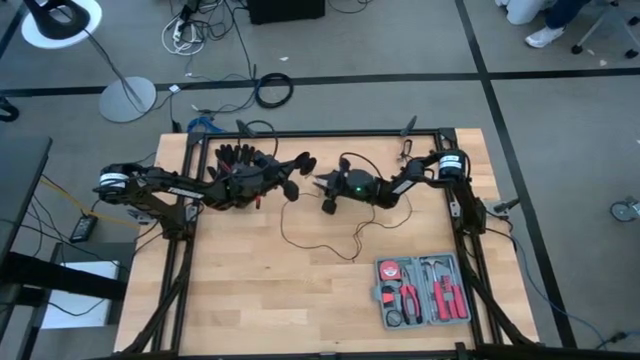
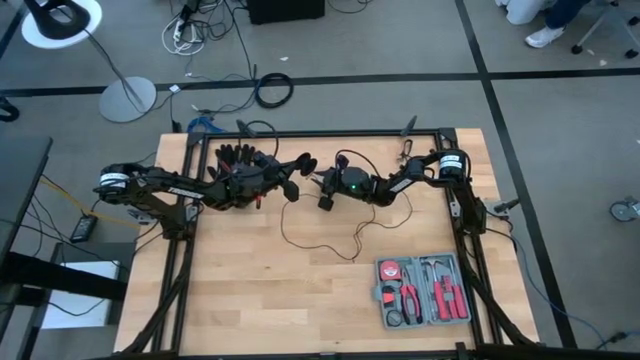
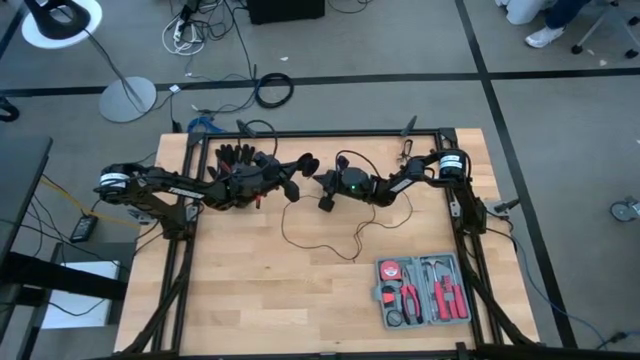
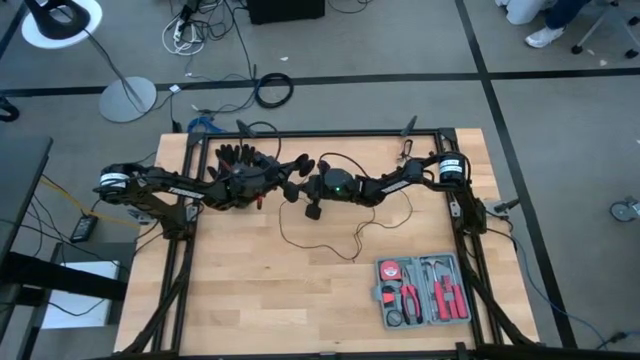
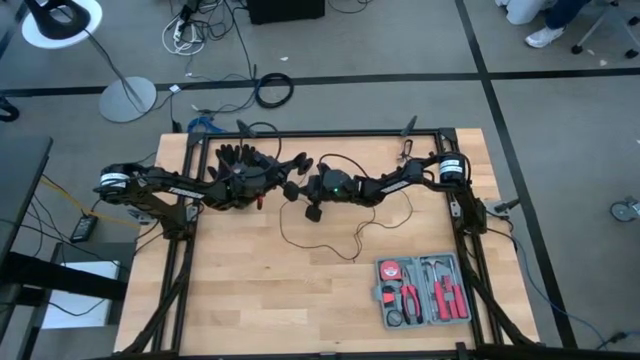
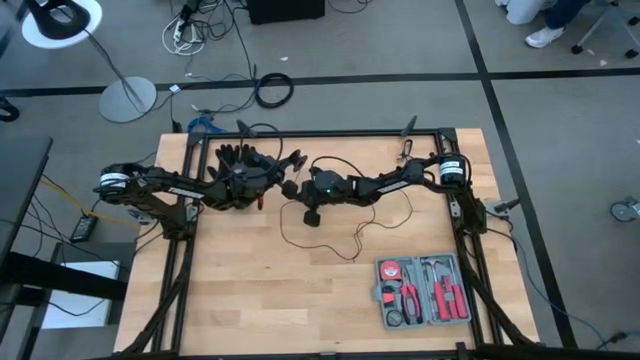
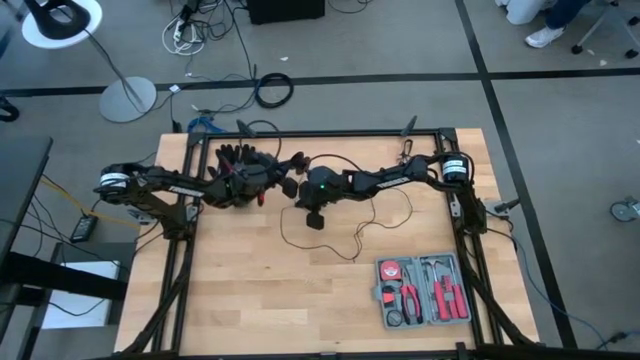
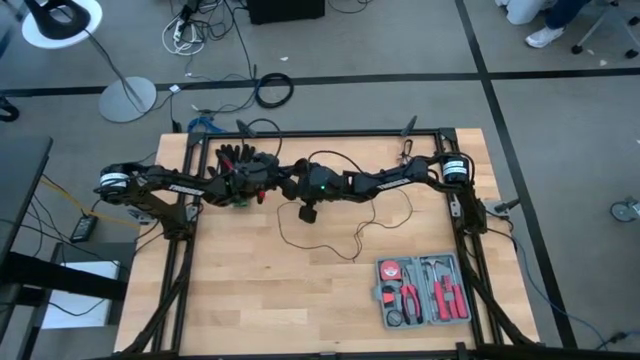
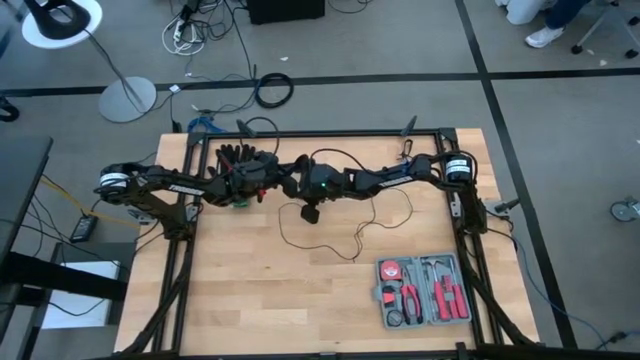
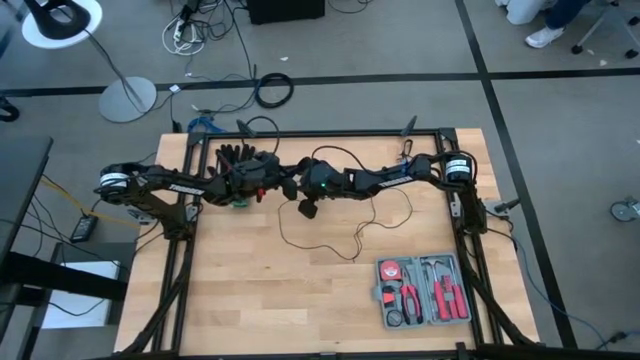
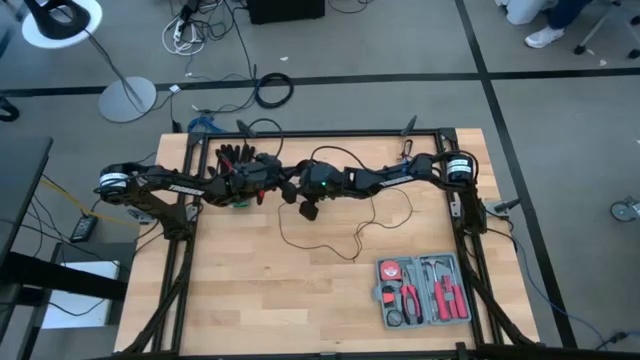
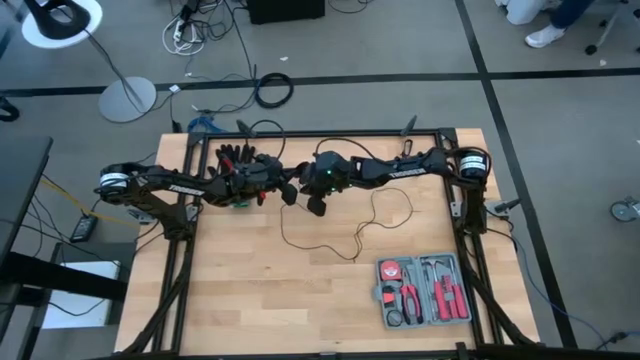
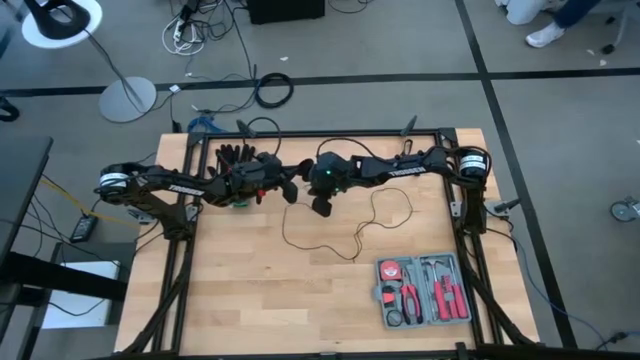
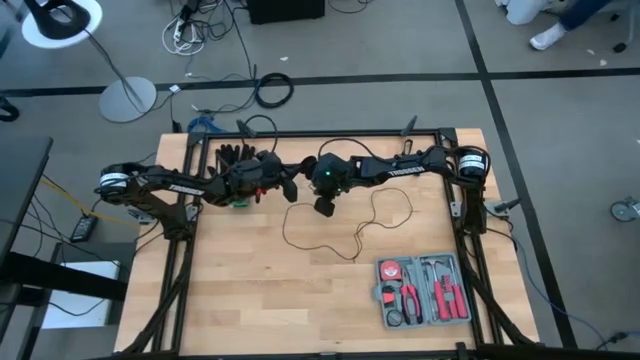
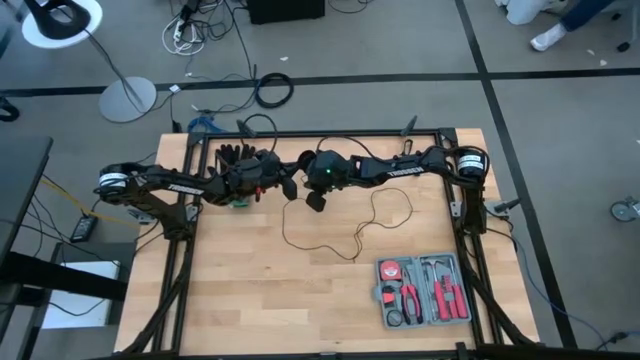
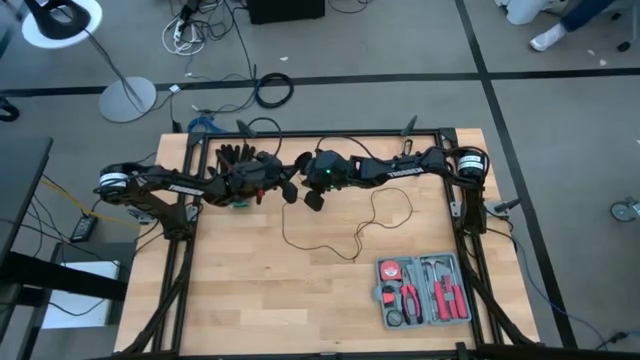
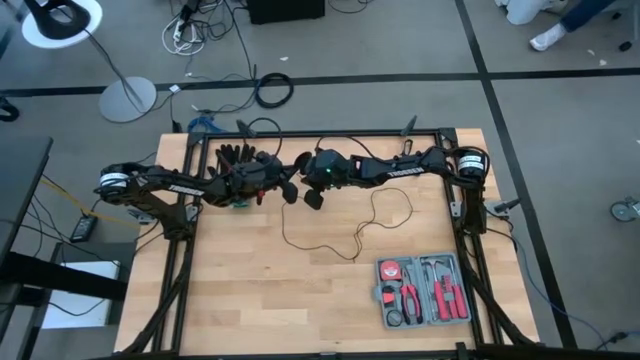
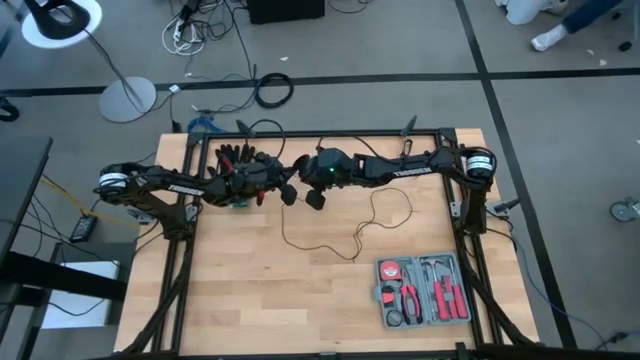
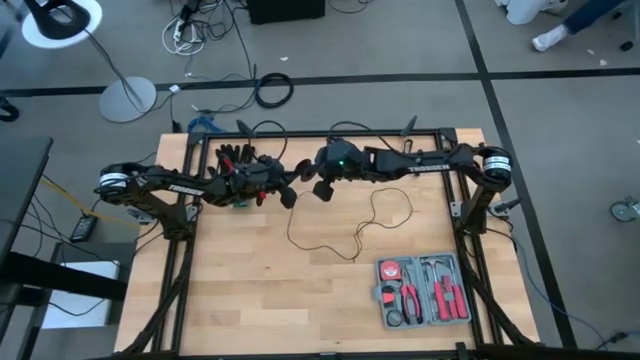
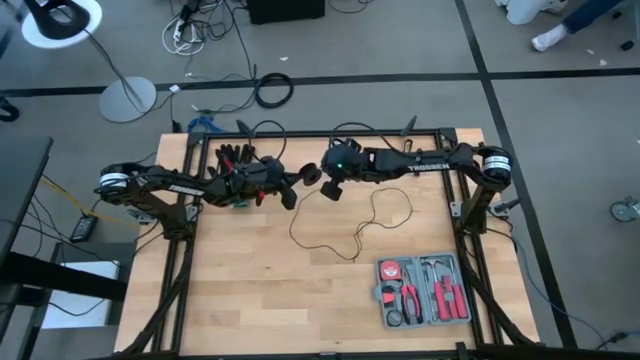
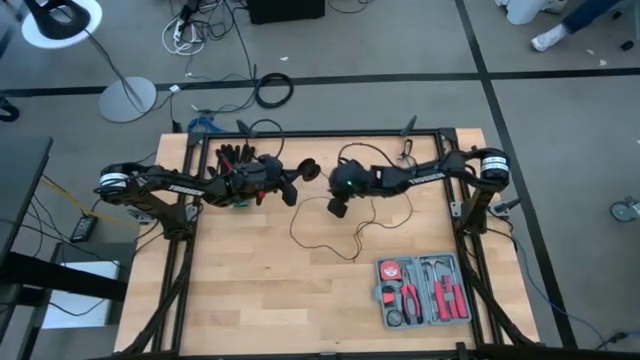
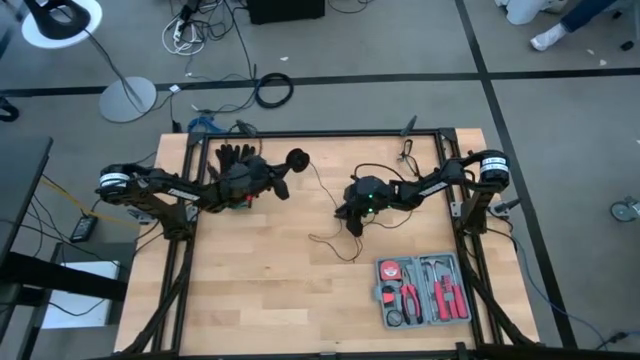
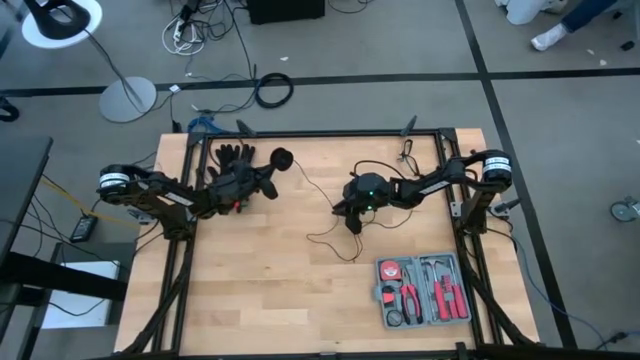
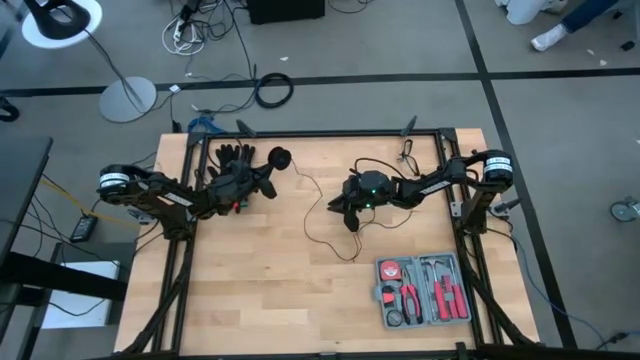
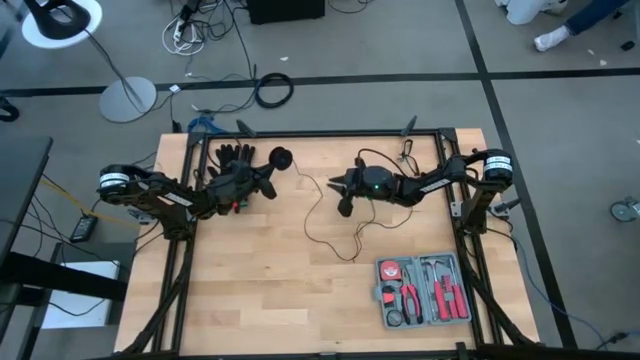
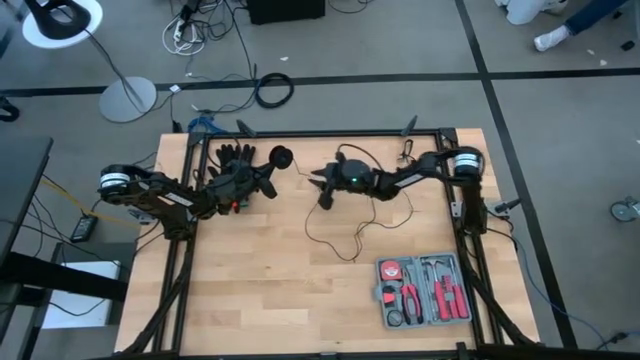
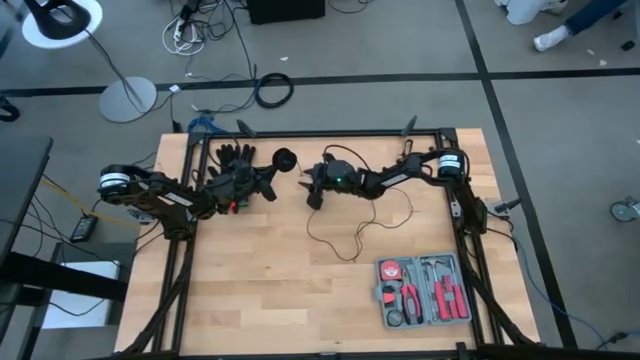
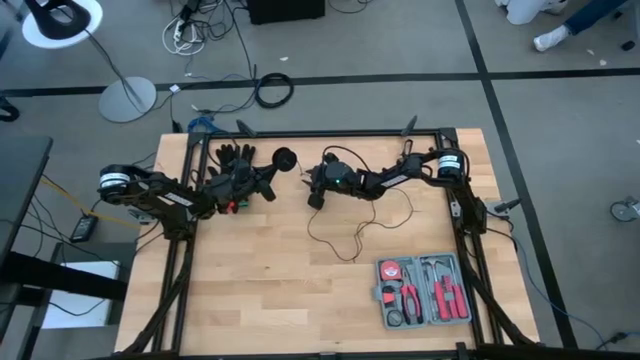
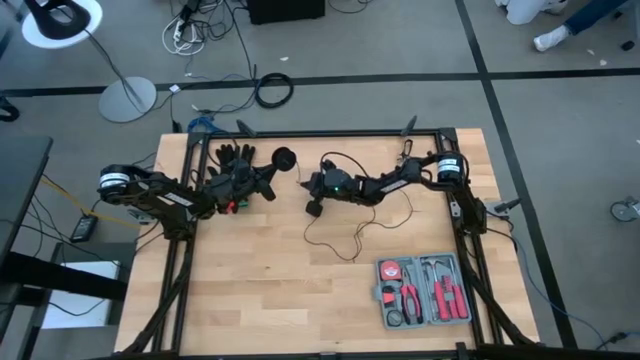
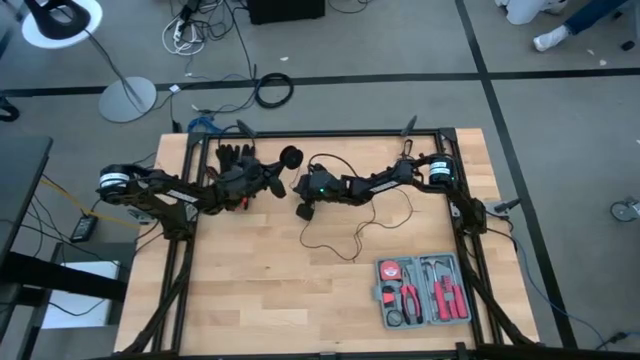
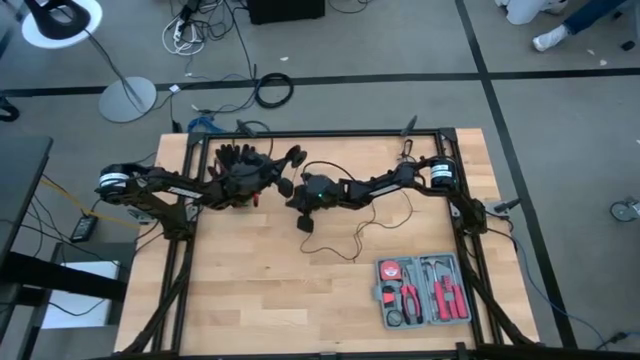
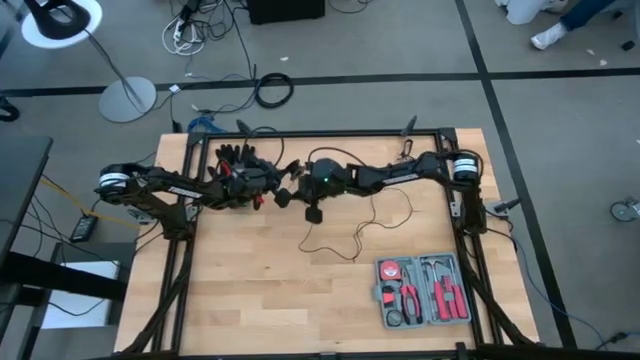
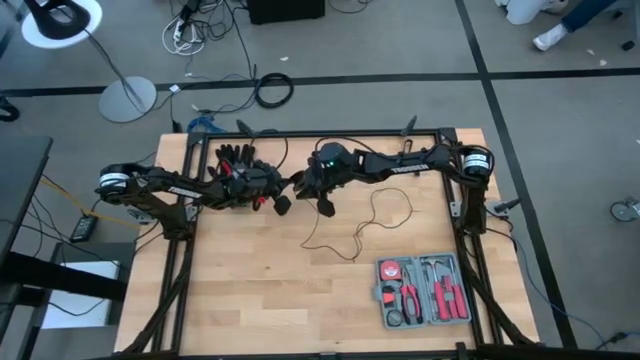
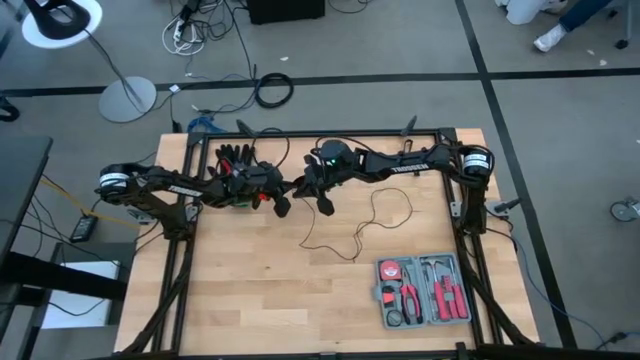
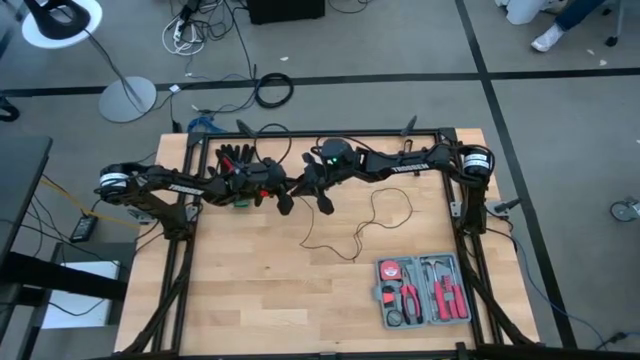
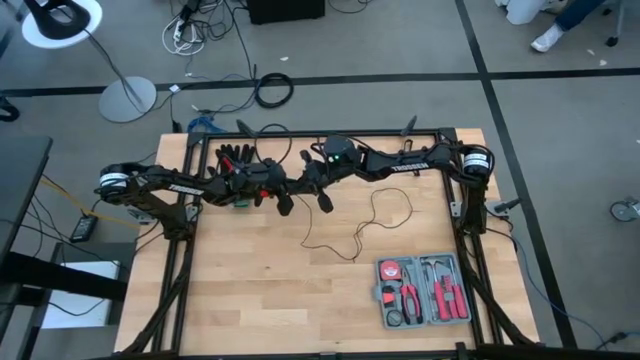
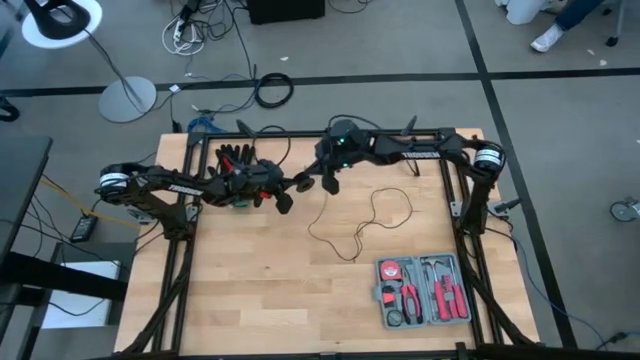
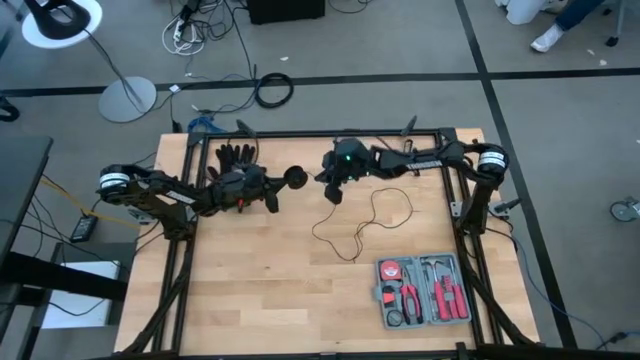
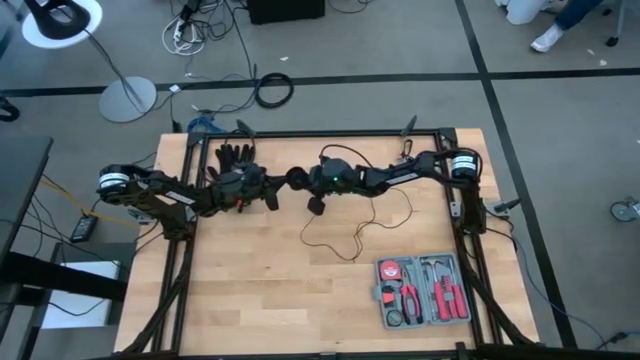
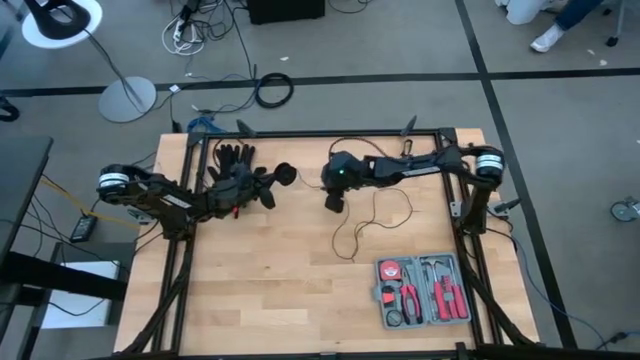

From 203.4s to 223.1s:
Task: Coil cords
Coil the black wire

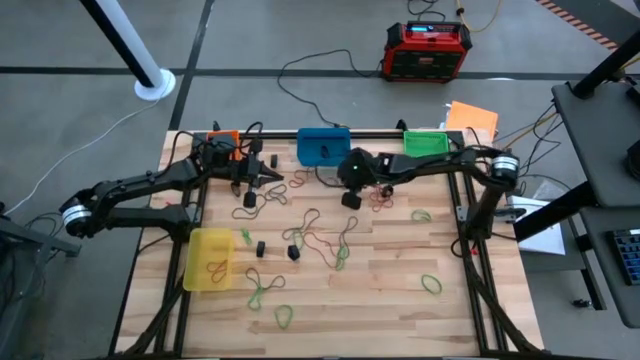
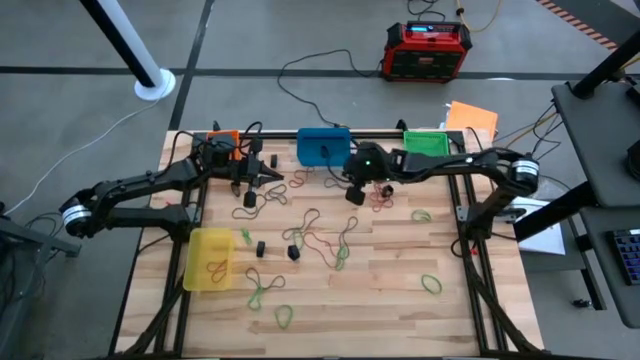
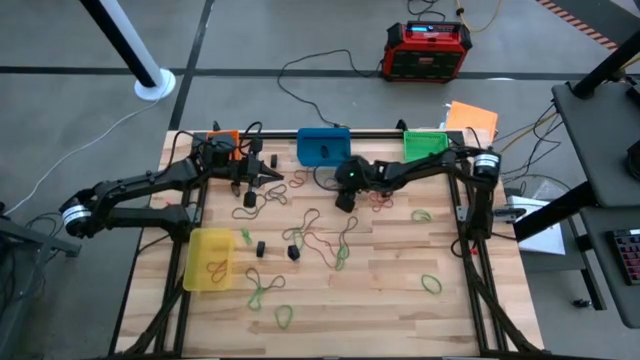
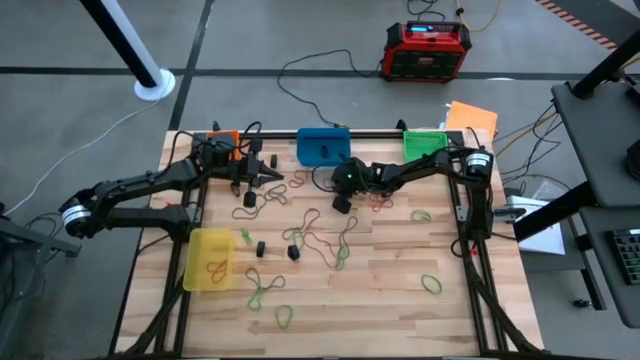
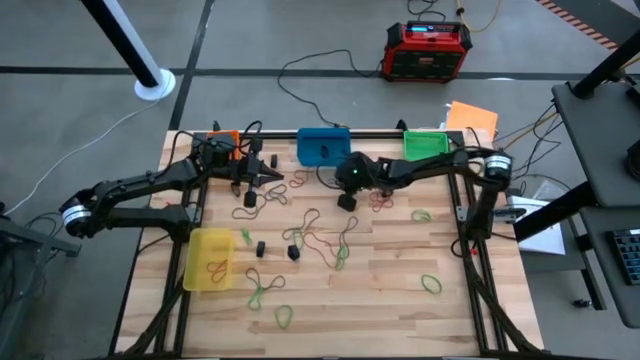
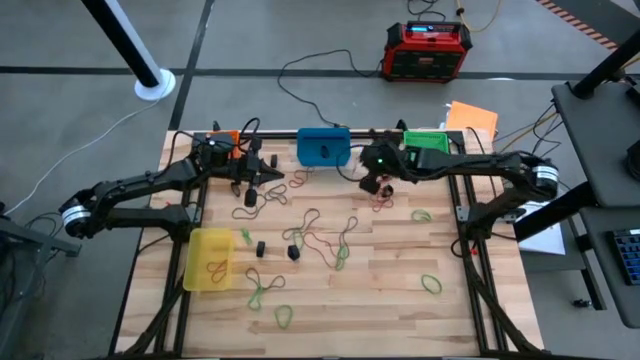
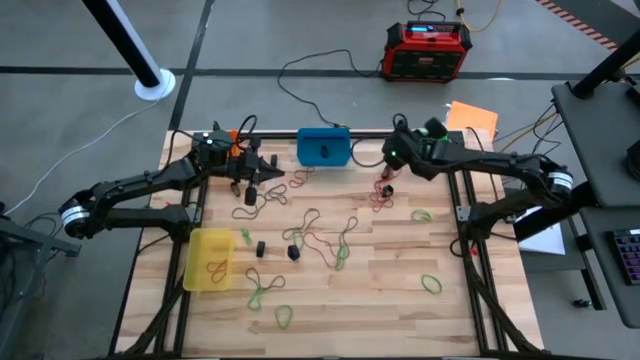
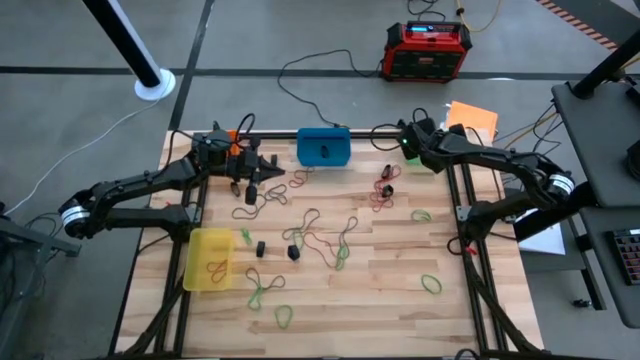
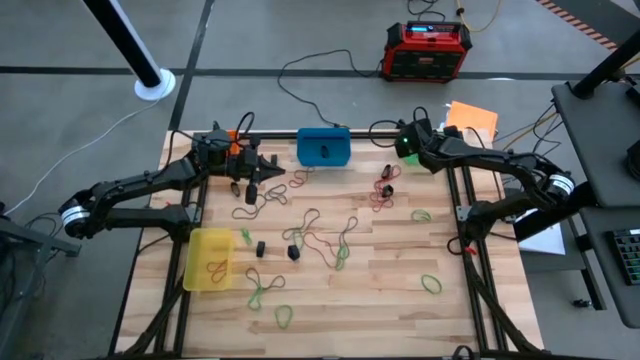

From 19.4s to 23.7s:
Task: Sort rubber bands into baskets
Put the violet rubber band into the green bin
